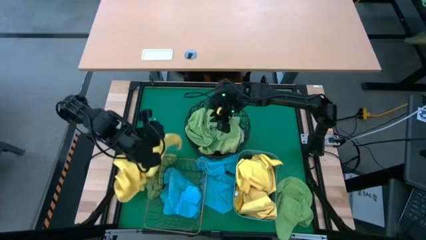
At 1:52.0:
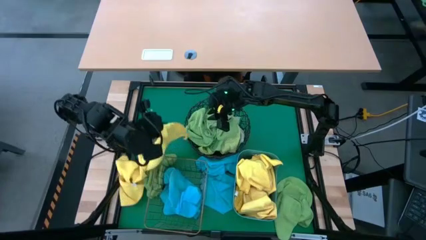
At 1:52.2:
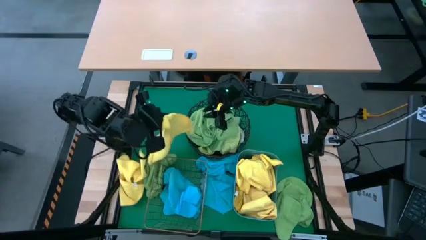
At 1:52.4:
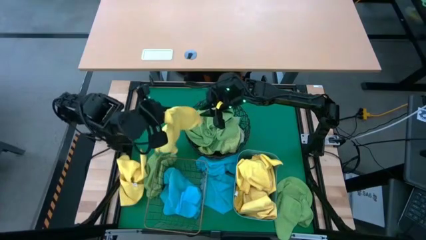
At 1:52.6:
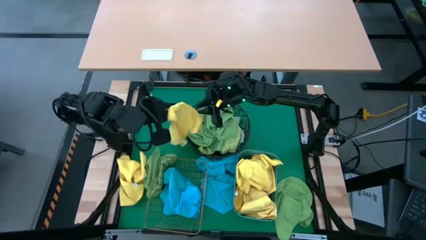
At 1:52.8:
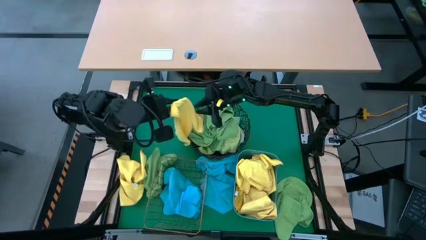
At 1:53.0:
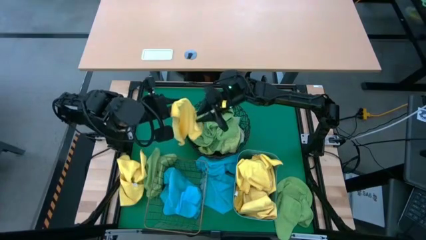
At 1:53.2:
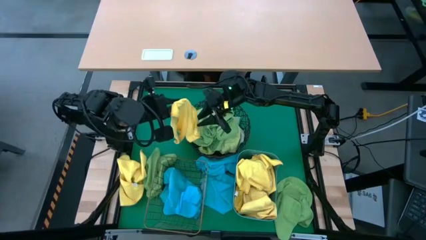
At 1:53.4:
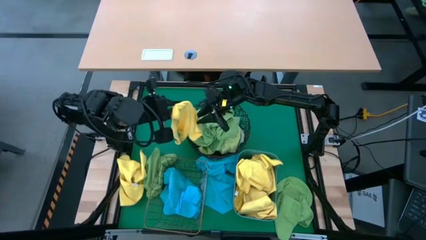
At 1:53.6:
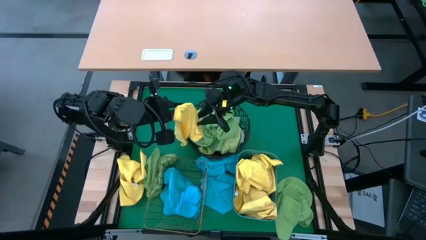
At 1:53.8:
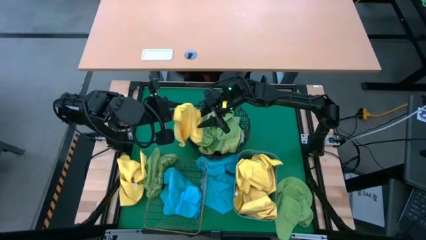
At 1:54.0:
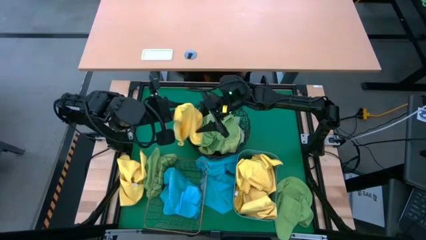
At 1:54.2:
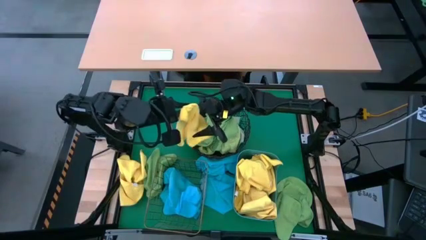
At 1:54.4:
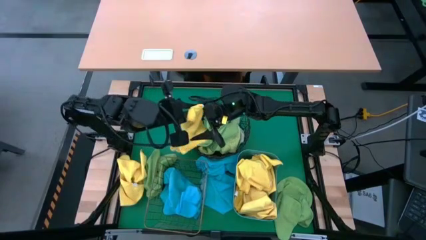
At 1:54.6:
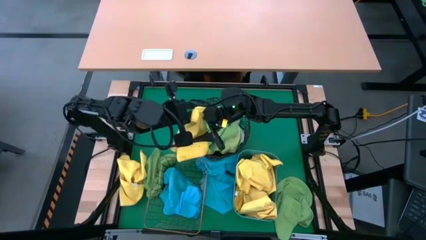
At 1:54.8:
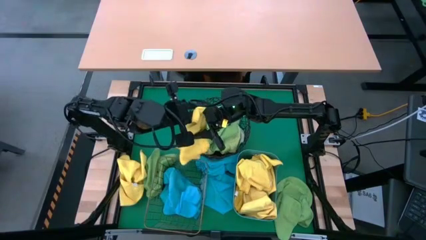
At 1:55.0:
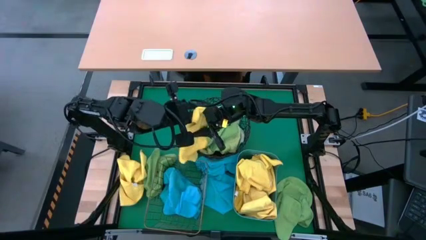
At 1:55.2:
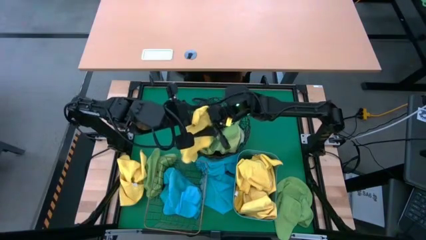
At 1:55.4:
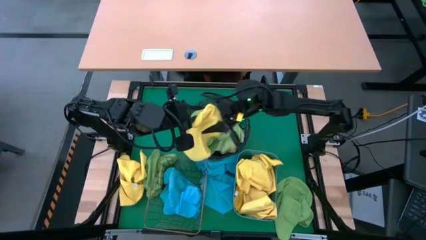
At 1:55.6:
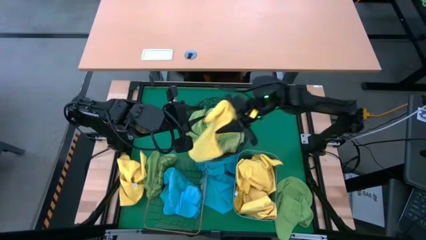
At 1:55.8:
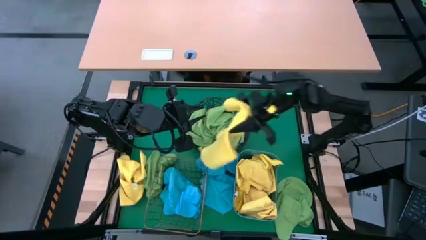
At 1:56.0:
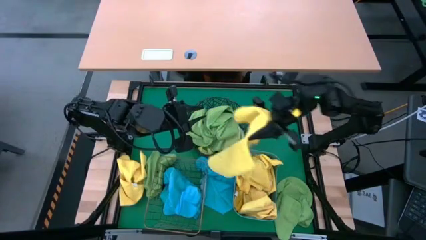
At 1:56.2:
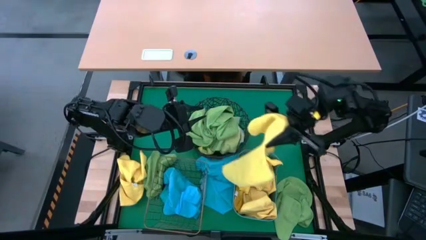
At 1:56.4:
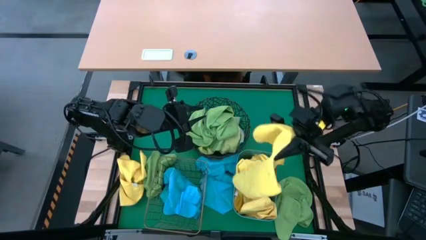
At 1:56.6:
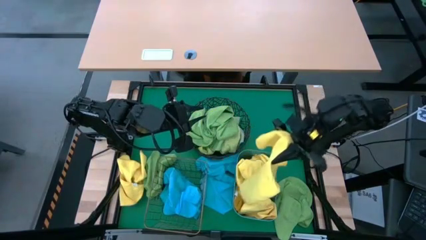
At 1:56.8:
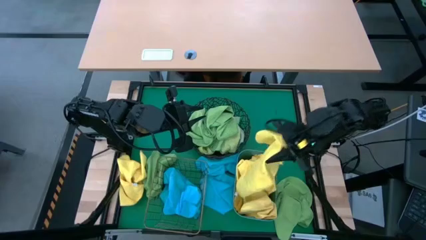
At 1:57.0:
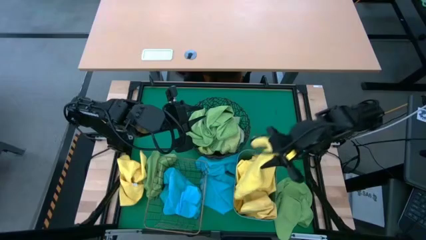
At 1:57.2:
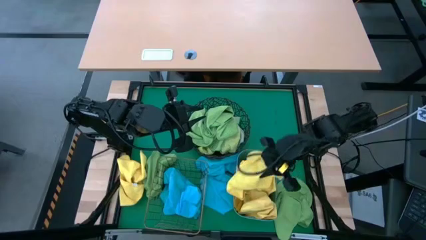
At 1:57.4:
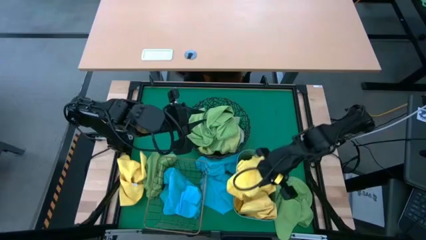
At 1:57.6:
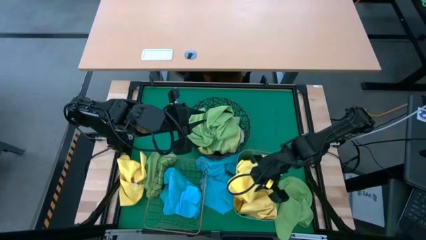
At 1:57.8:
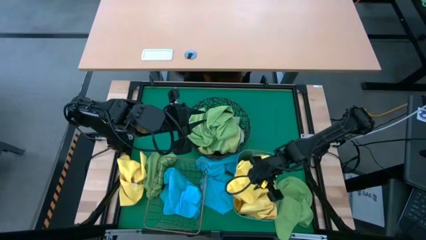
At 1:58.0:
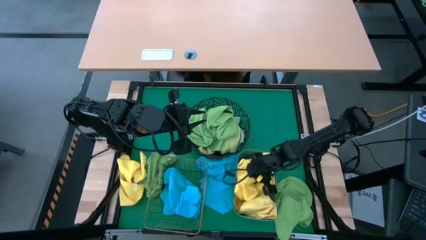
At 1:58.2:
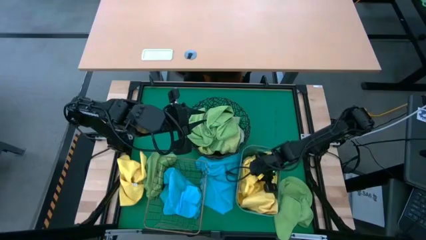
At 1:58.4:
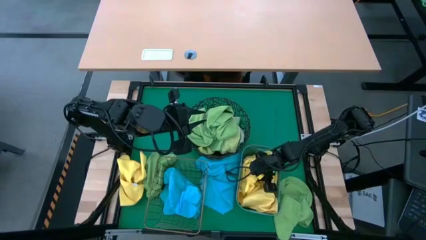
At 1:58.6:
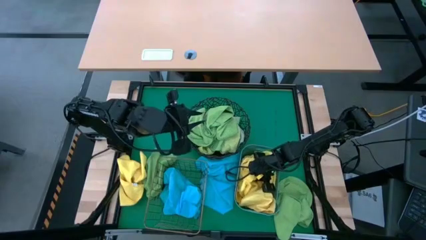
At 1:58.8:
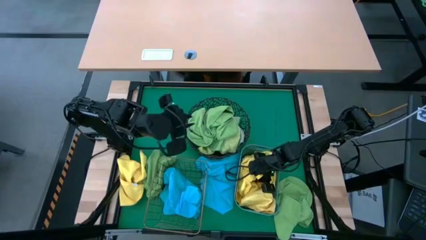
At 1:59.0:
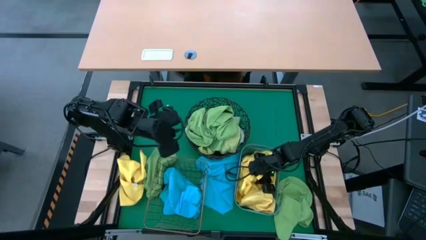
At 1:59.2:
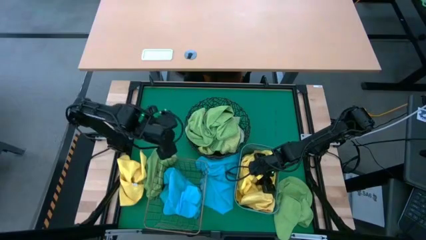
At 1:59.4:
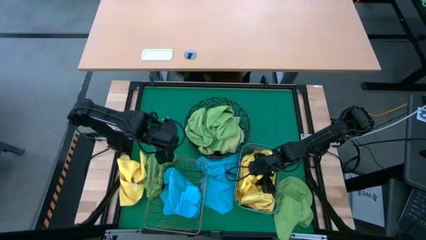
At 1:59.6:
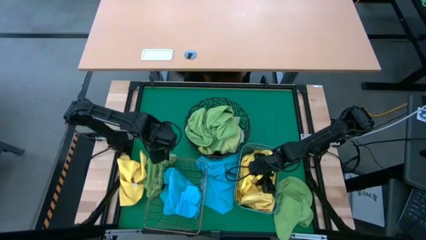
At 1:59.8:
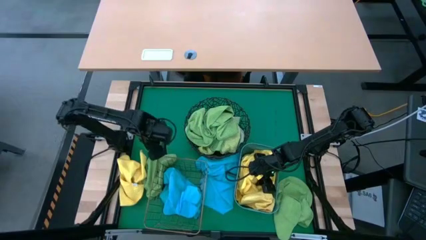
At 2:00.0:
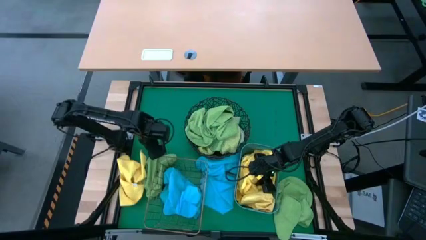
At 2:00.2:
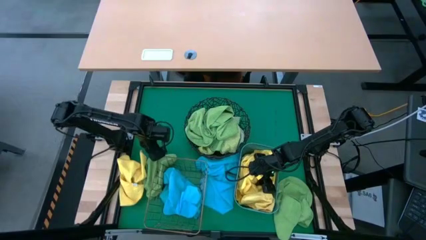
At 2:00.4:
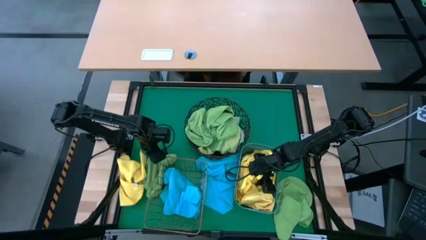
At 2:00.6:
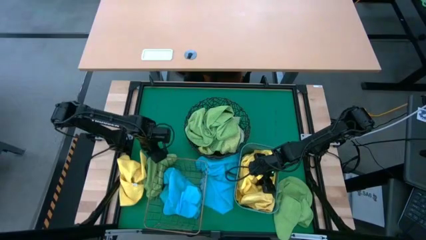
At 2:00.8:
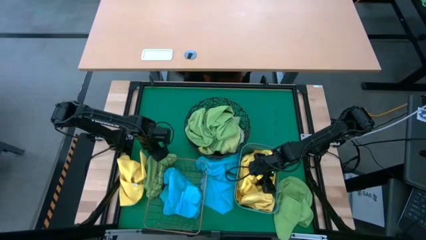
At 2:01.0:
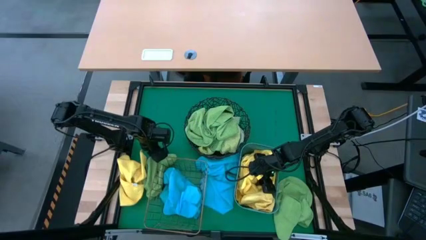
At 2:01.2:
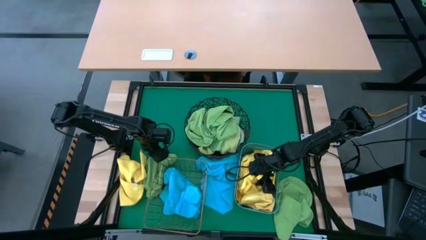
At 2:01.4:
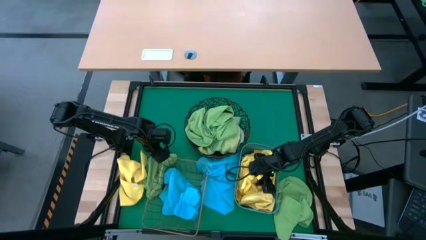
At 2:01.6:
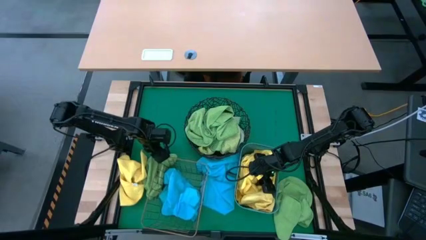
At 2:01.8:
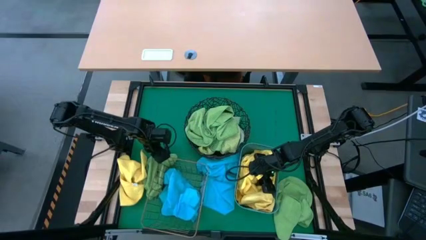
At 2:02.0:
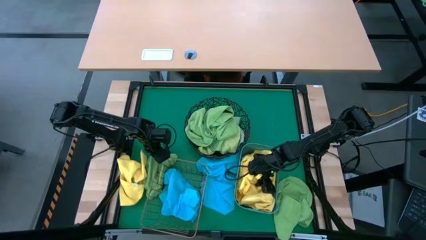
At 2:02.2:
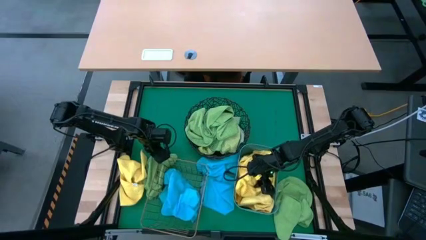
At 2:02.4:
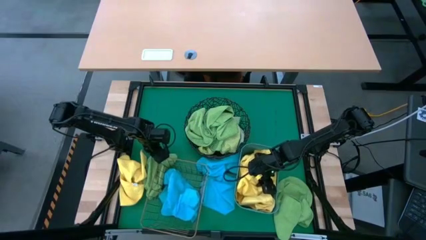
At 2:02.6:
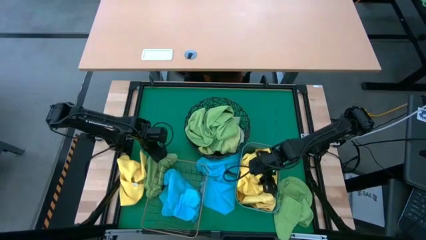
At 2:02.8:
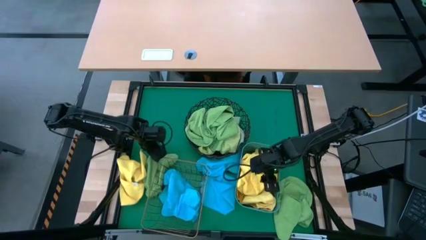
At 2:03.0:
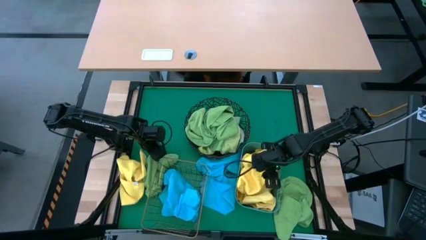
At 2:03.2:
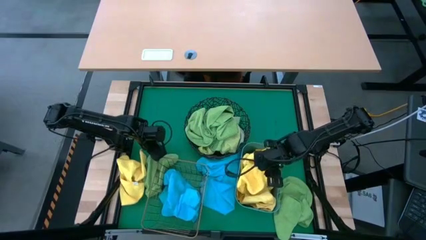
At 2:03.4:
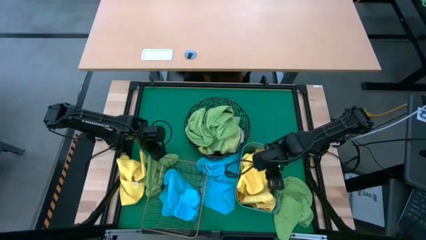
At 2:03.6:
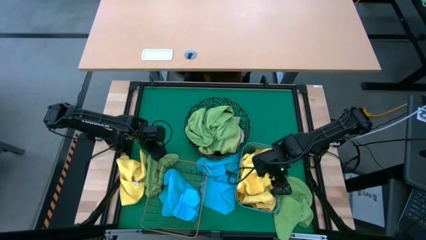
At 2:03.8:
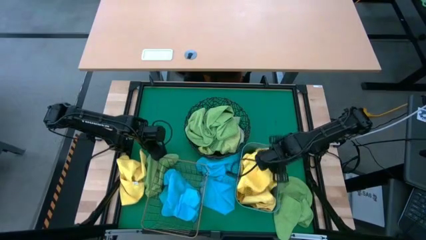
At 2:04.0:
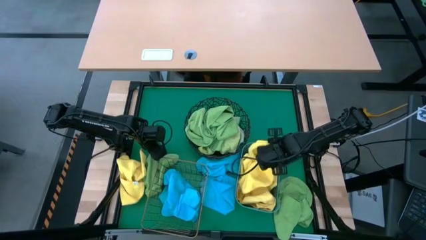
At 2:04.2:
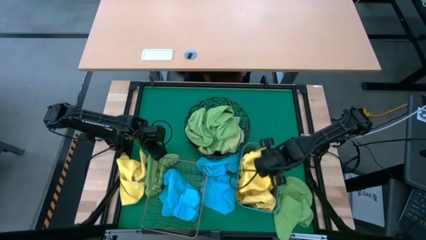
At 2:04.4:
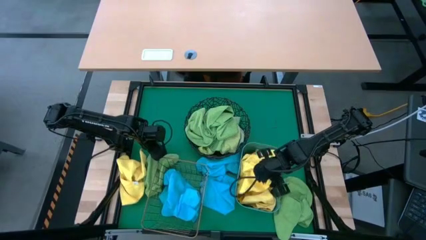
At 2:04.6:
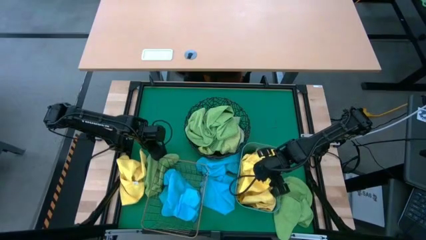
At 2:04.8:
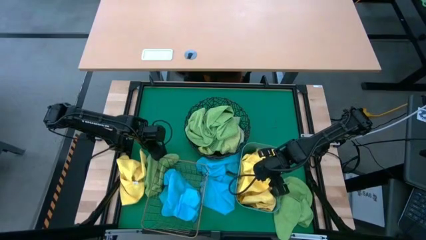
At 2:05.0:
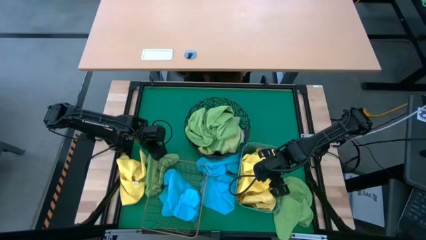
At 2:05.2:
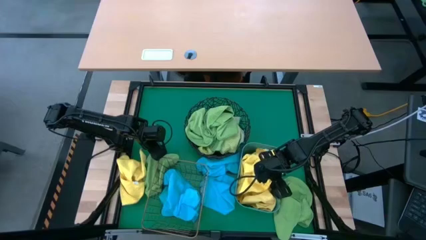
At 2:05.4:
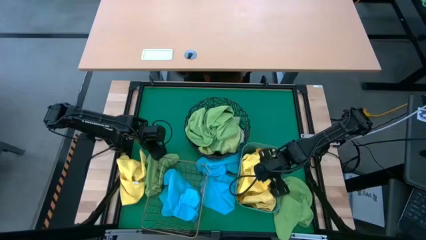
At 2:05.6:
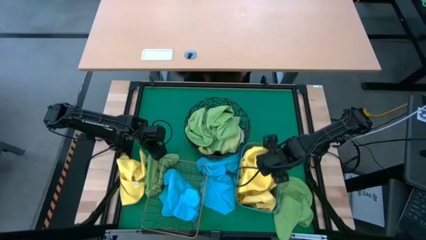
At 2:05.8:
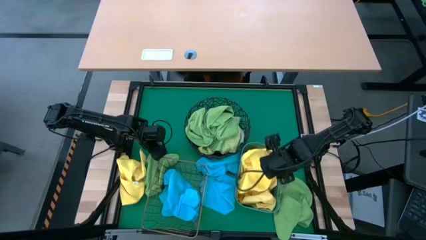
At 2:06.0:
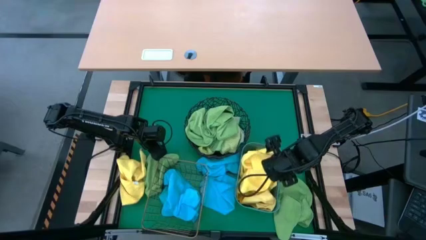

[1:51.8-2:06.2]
Task: Sort microfiber towel by color & place in baskets
Put the yellow microfiber cloth into the blue bin

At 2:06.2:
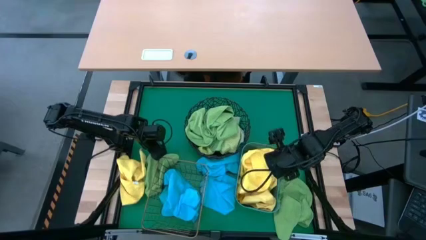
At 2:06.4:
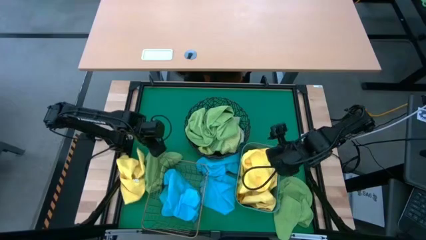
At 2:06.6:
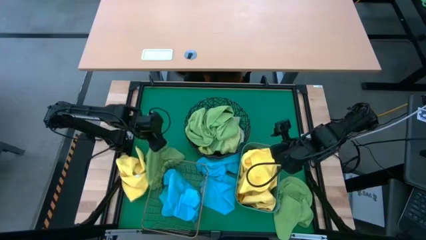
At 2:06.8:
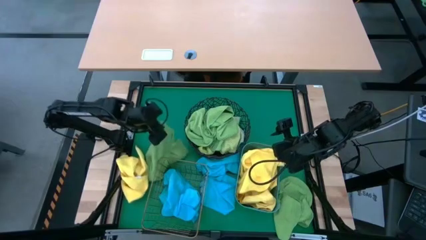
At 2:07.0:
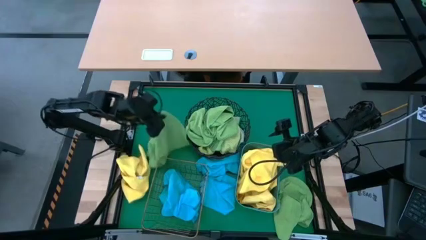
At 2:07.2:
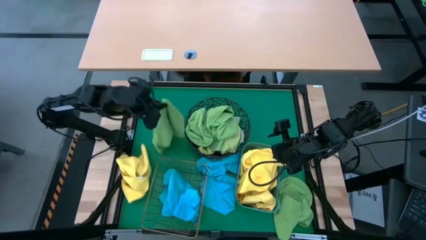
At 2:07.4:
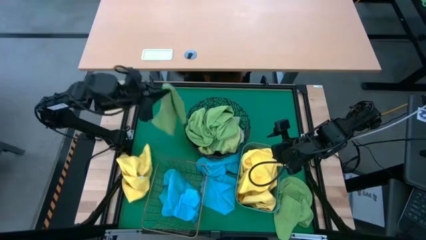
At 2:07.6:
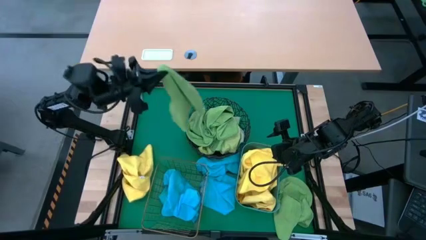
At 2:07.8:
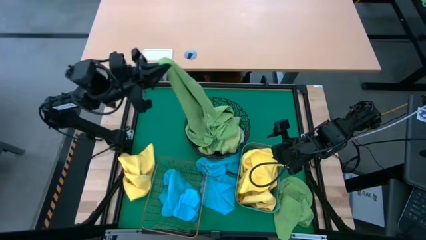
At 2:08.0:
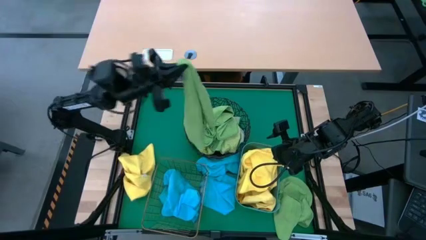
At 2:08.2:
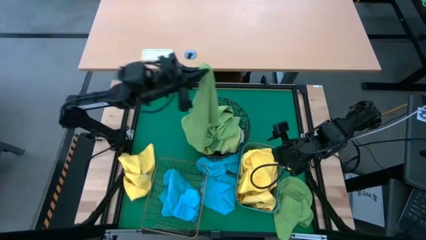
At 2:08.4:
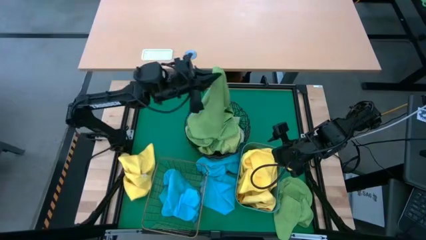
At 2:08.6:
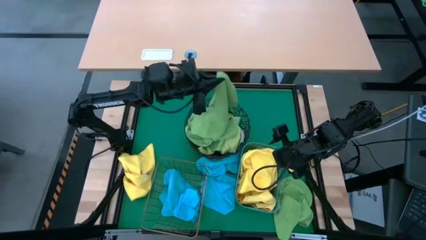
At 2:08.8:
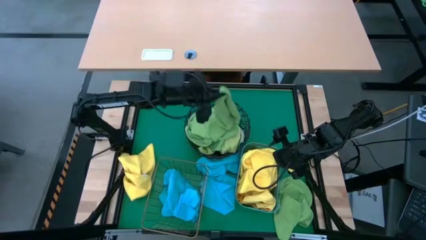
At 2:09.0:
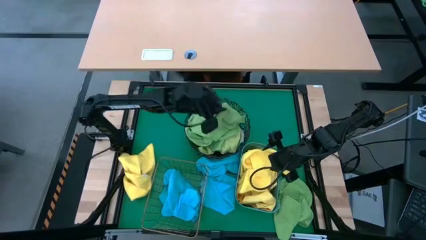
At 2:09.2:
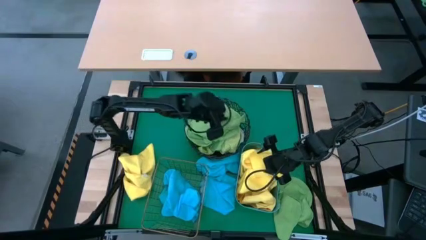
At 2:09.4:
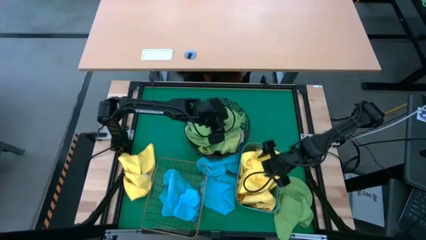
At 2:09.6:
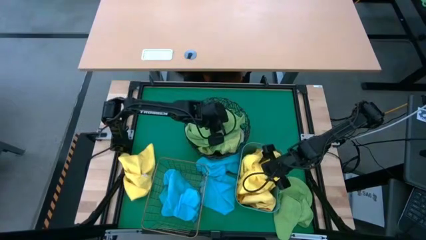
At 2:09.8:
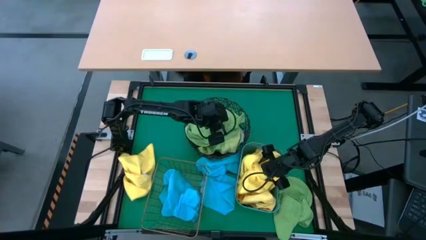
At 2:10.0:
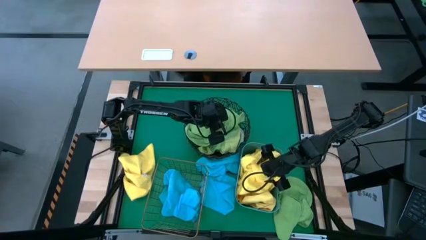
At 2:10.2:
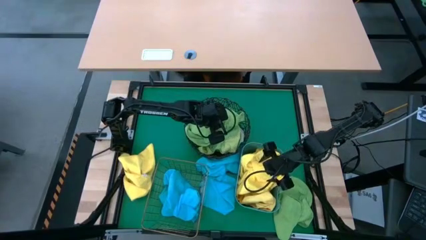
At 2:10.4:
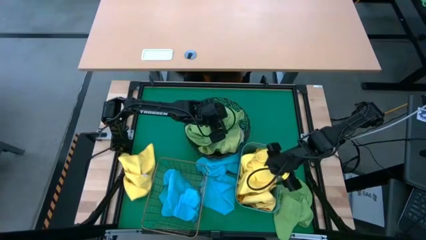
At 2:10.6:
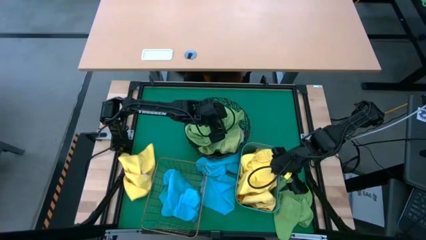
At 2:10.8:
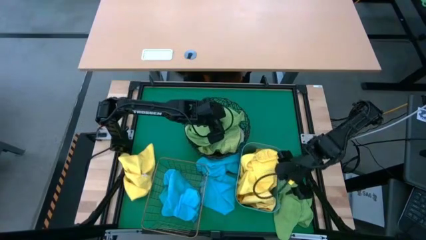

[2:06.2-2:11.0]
Put the green microfiber cloth into the round wire basket
